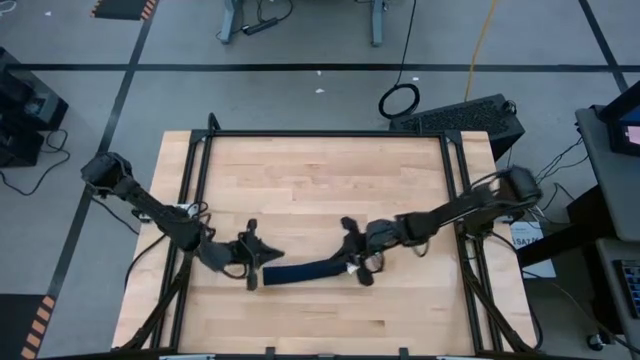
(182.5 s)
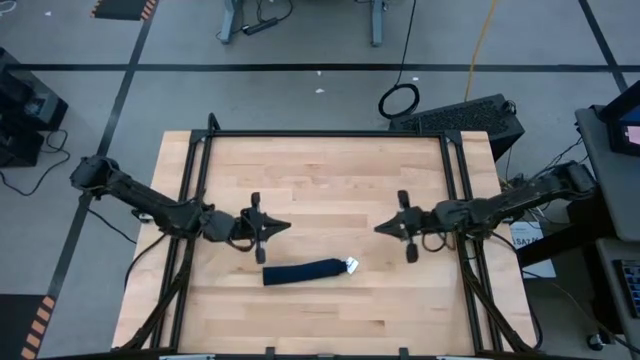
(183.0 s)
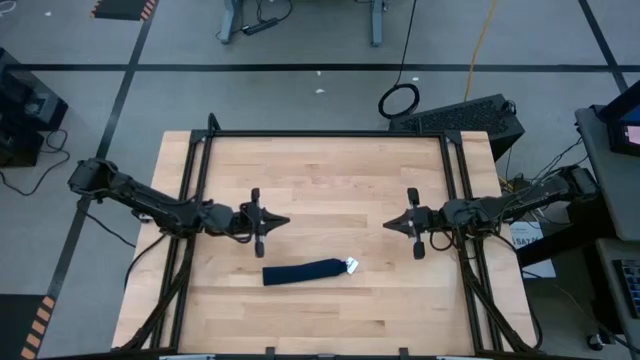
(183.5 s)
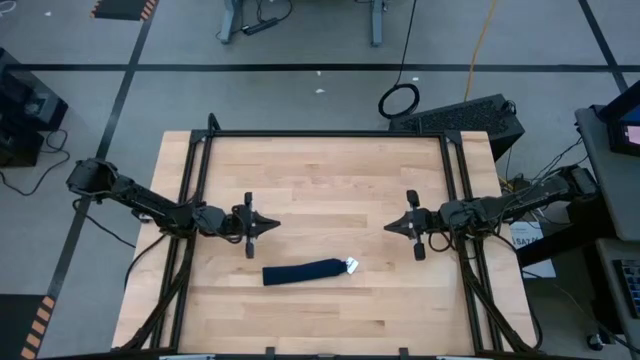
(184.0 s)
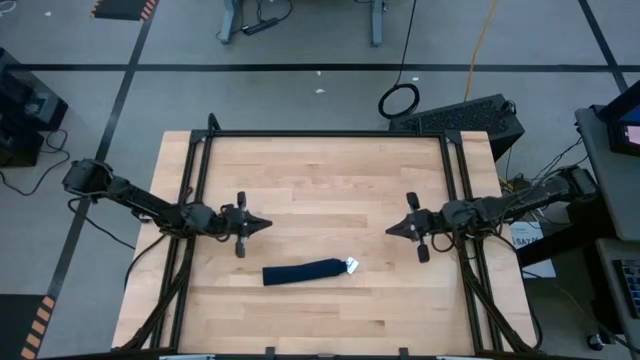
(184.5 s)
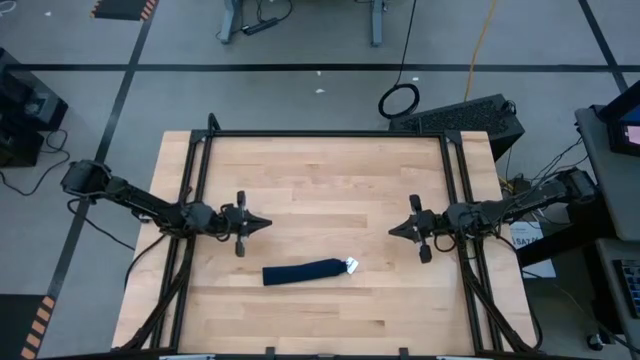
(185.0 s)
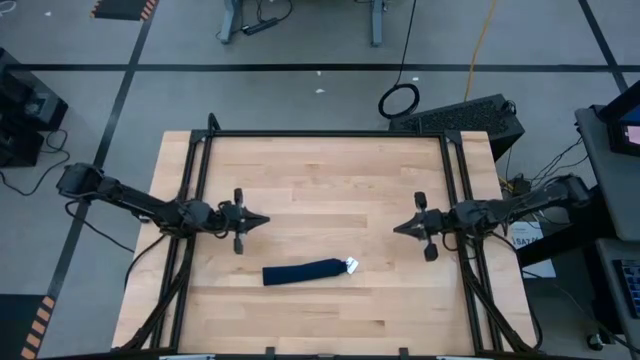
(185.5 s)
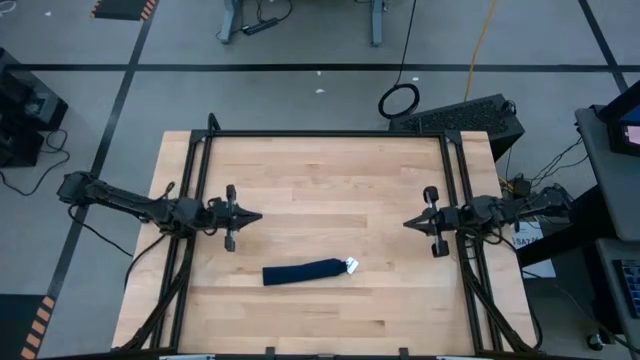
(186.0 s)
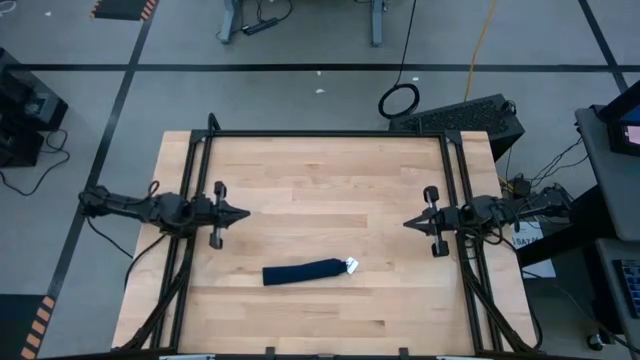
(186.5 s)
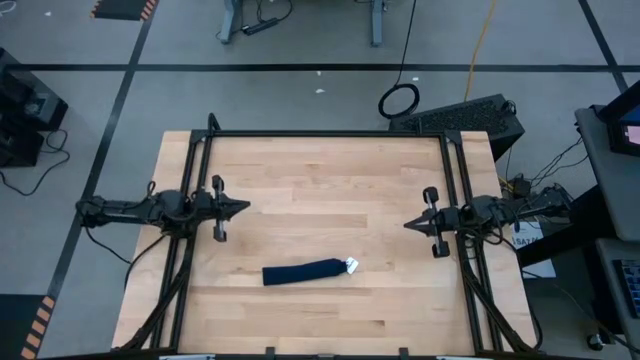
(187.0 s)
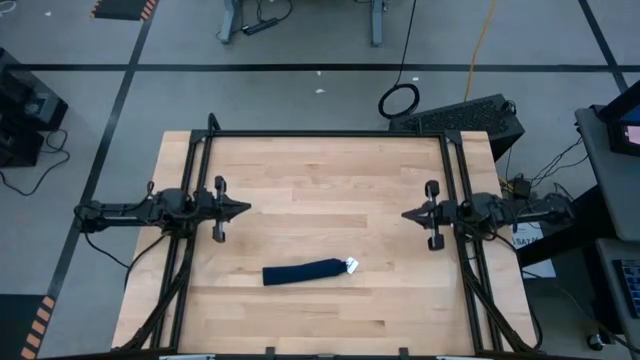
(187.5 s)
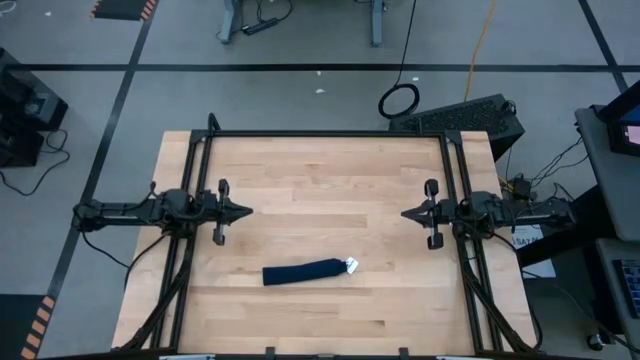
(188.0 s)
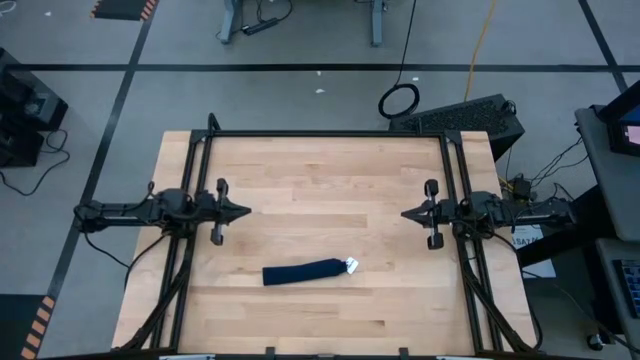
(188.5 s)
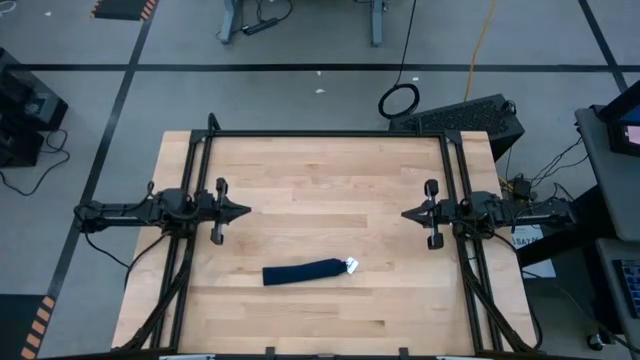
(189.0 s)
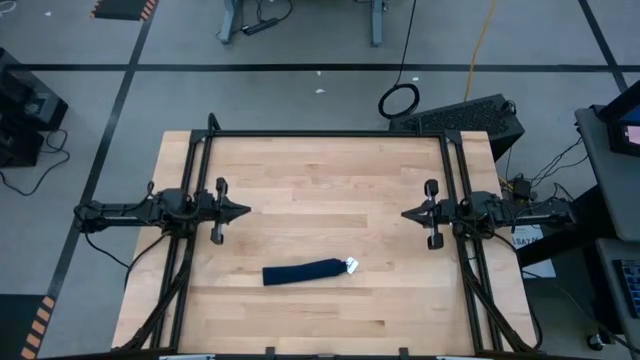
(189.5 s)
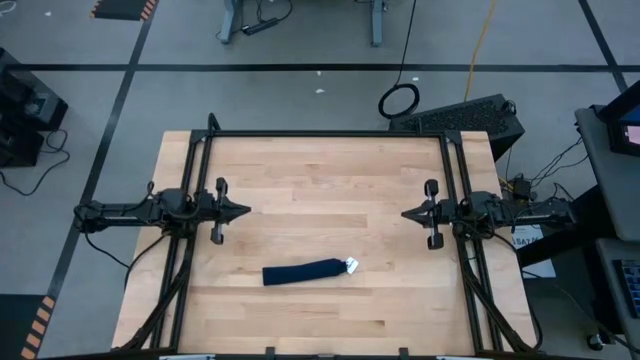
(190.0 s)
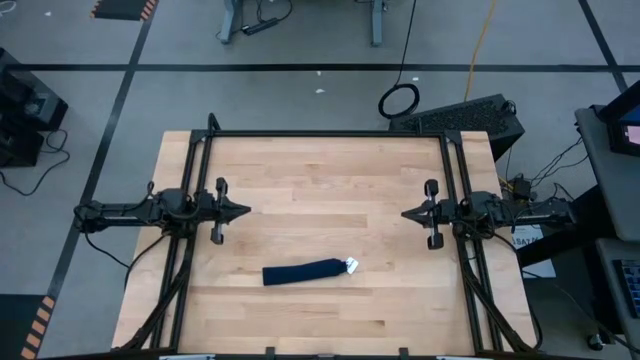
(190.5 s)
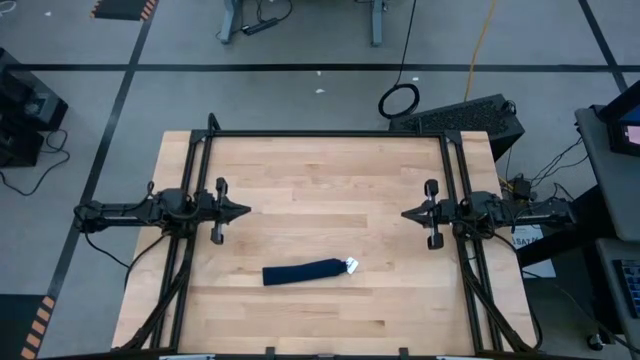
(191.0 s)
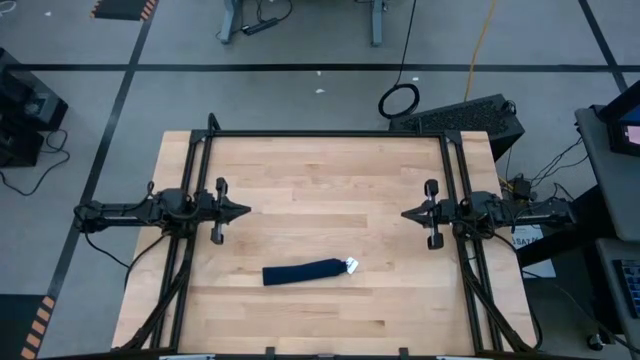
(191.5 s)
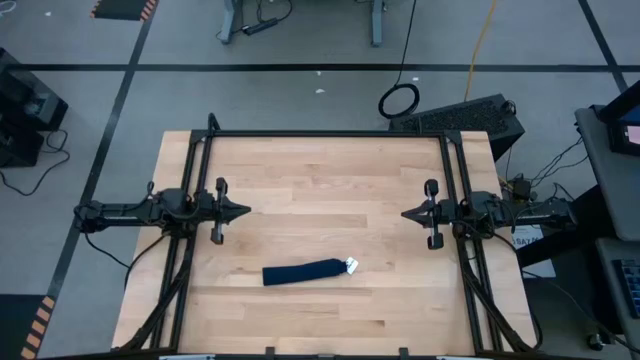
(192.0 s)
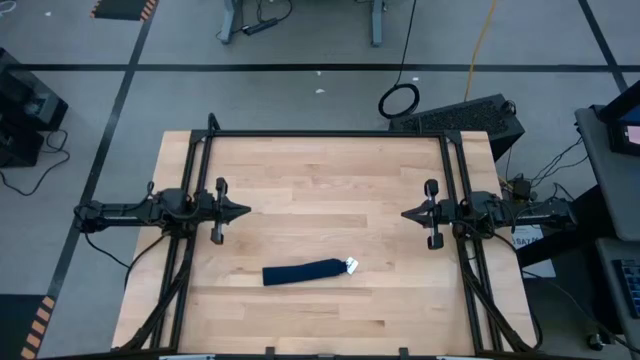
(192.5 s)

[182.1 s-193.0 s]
Task: Roll towel
Return to Home Position
